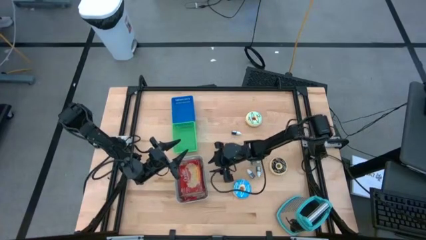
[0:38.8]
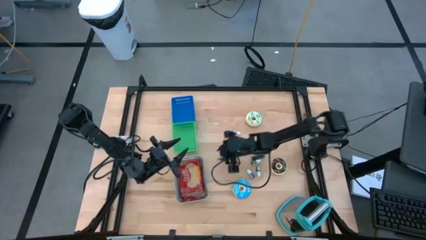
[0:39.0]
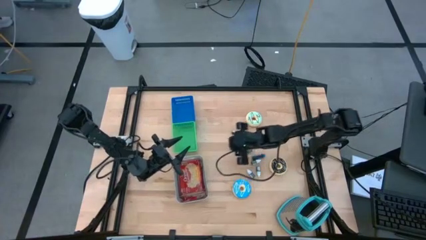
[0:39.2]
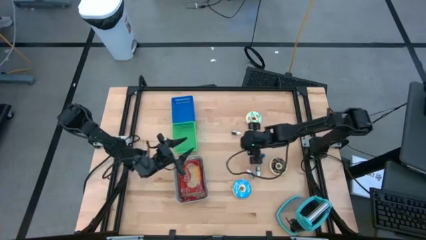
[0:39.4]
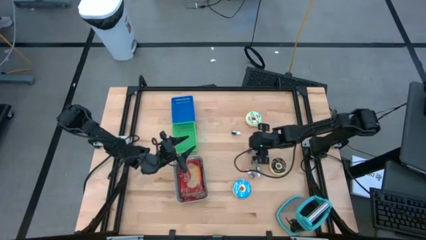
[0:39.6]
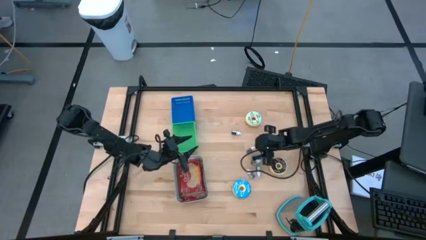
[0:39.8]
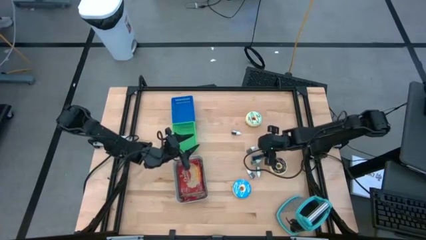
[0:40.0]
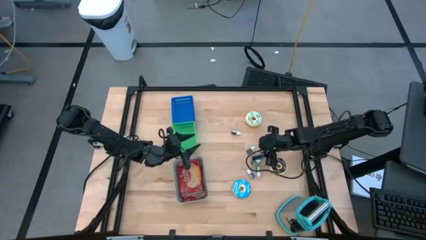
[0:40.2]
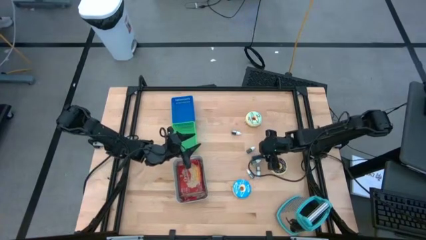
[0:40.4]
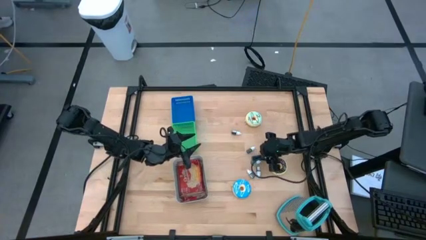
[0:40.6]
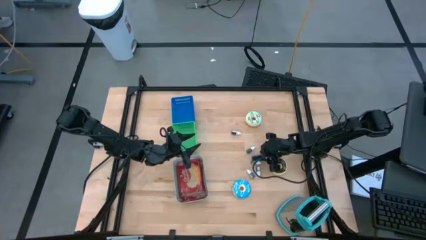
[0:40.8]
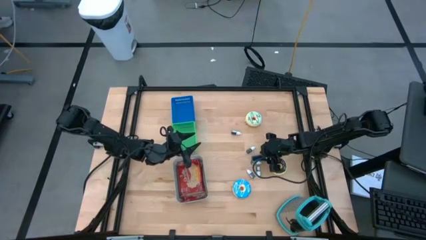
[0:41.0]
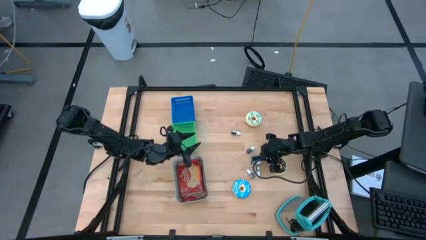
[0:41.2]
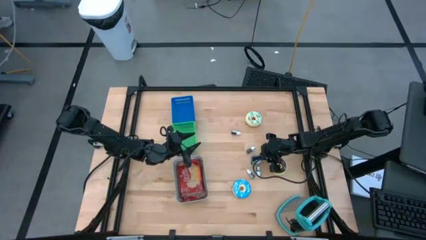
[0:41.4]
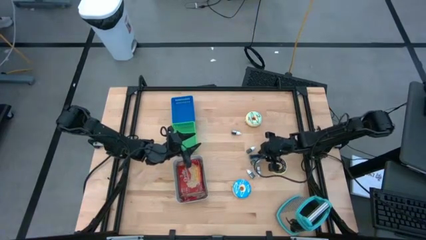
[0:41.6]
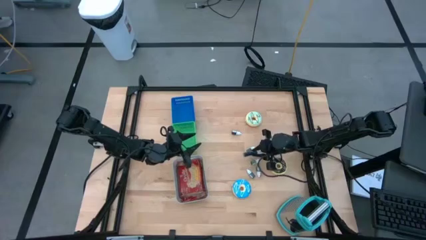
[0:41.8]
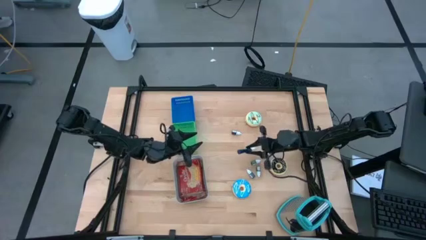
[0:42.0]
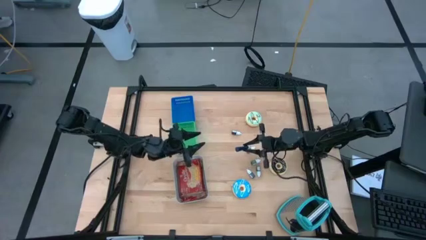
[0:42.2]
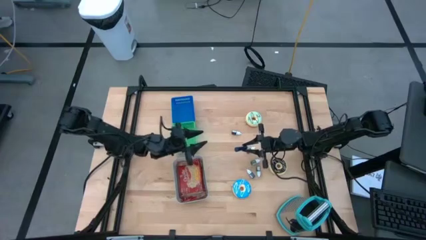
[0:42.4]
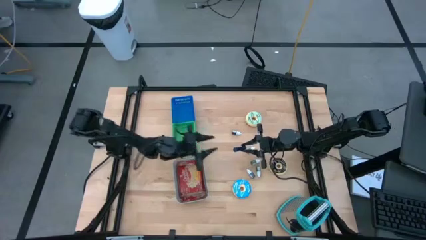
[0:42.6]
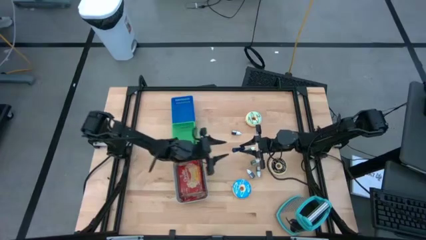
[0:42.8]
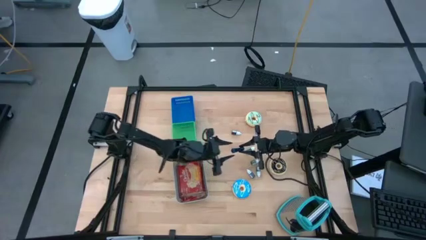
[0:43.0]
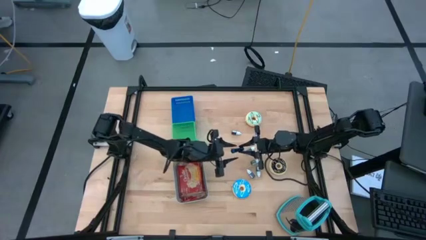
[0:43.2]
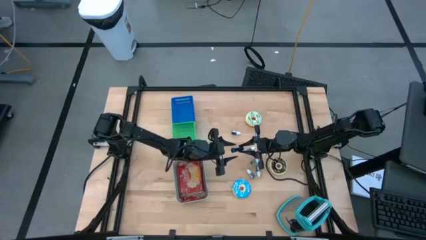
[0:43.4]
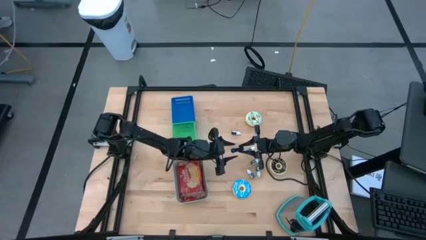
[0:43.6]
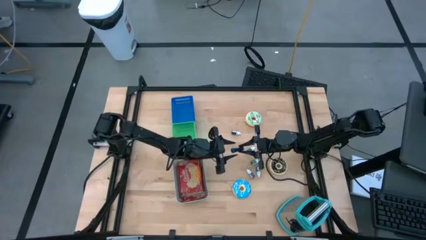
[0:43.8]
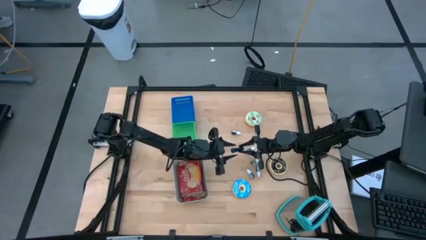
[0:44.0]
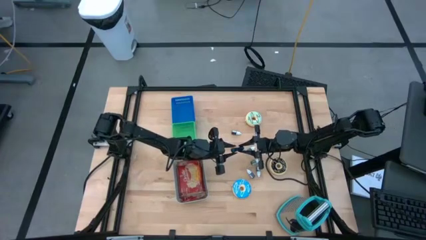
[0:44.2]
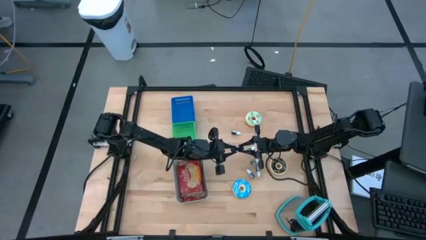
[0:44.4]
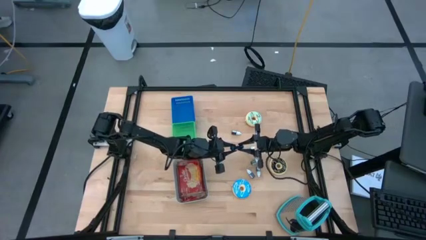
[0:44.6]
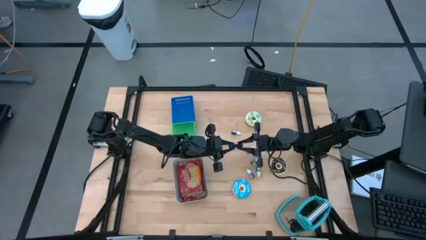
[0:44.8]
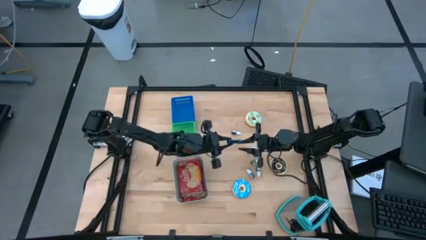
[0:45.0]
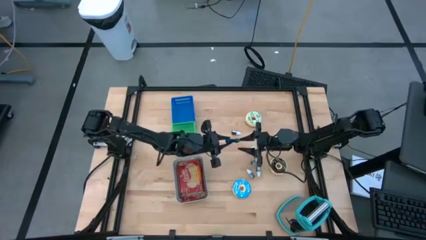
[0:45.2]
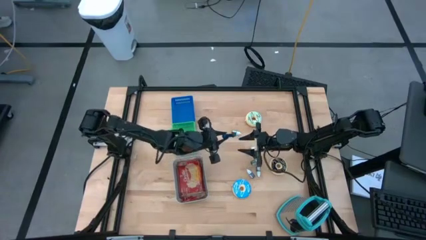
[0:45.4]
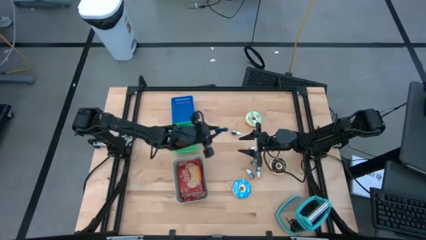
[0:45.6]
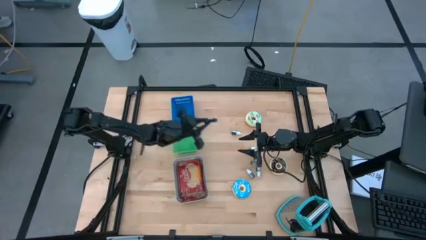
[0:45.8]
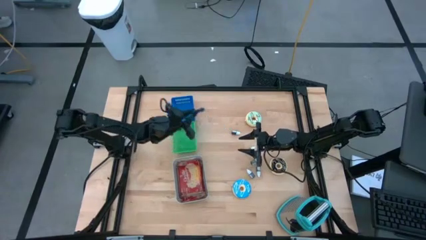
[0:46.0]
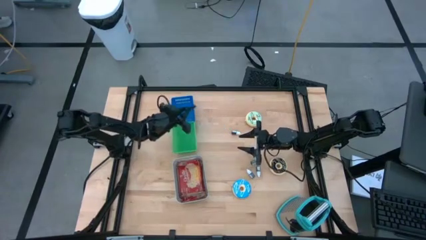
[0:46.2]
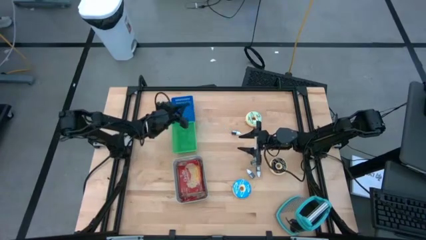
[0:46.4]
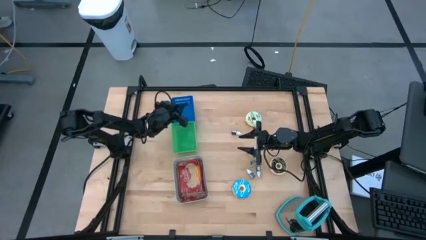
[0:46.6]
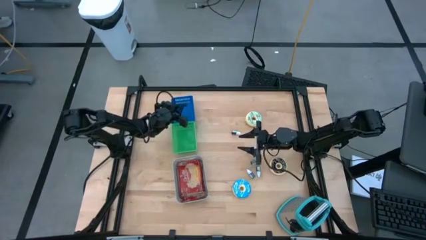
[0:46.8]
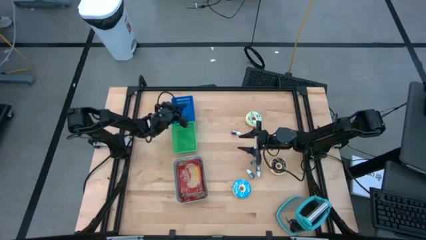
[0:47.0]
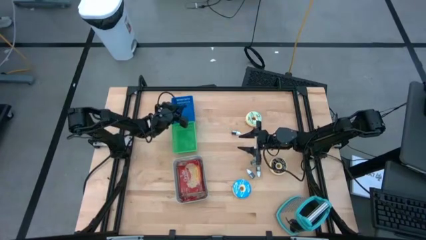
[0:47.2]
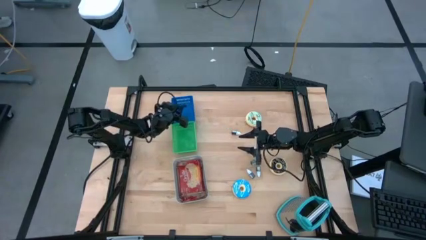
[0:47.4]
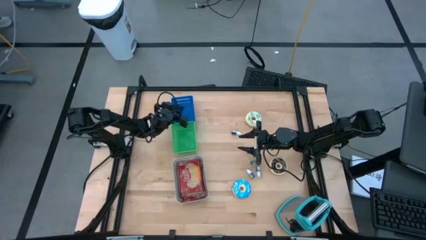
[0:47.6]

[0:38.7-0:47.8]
Task: Pick & Place Food Item
Put the blue food coloring bottle into the blue bin

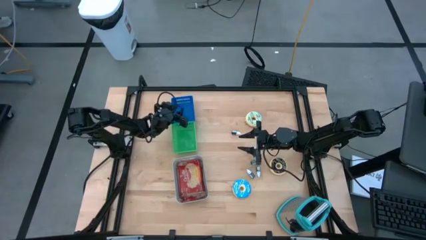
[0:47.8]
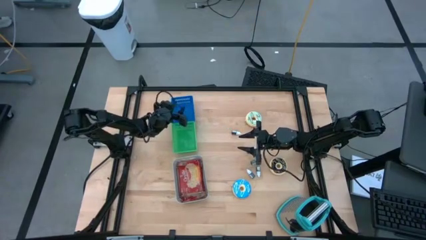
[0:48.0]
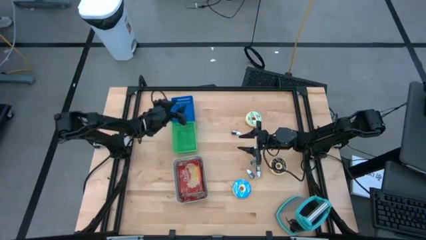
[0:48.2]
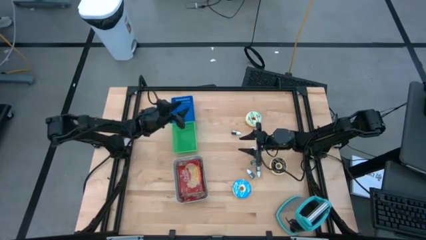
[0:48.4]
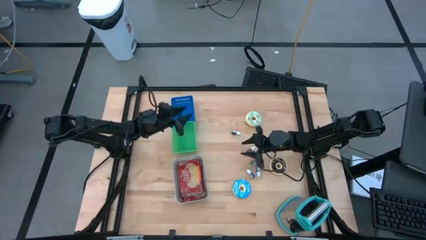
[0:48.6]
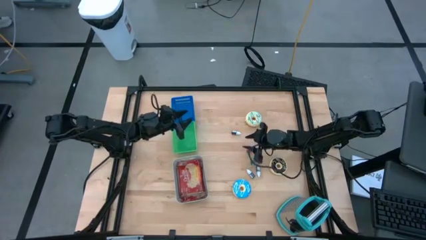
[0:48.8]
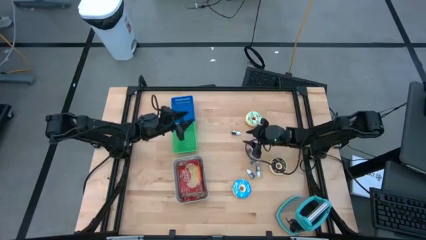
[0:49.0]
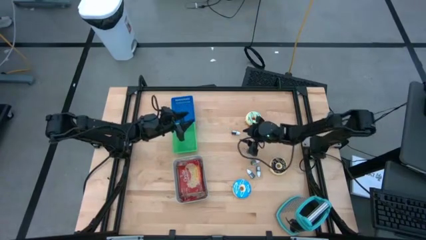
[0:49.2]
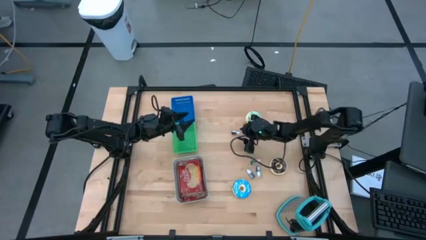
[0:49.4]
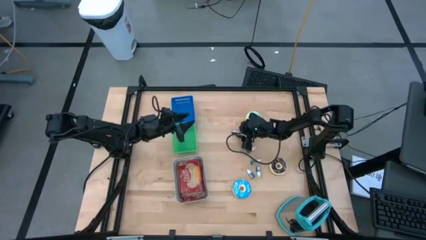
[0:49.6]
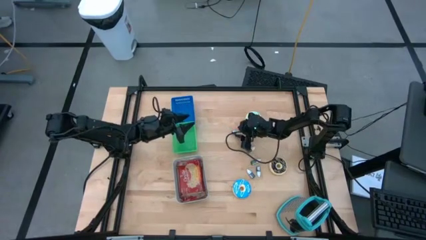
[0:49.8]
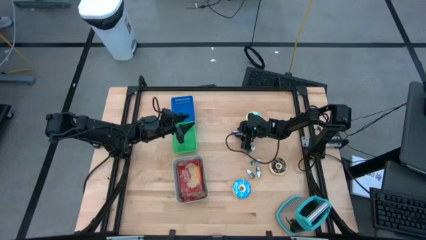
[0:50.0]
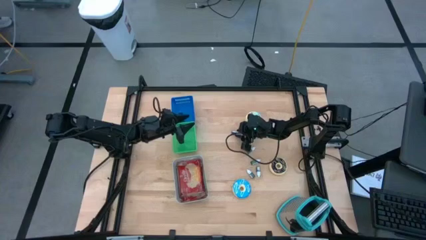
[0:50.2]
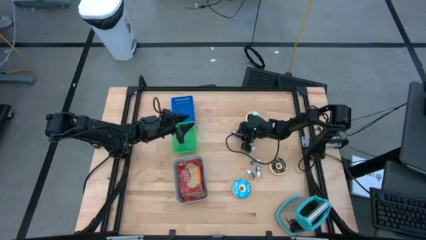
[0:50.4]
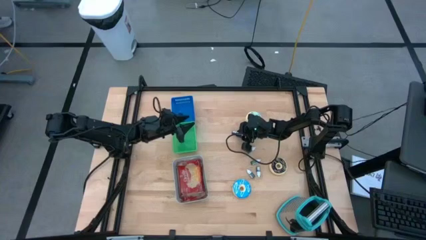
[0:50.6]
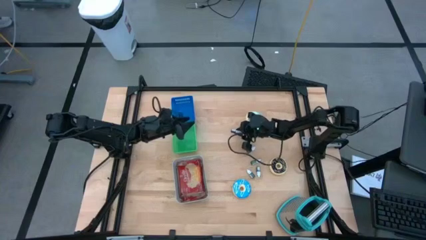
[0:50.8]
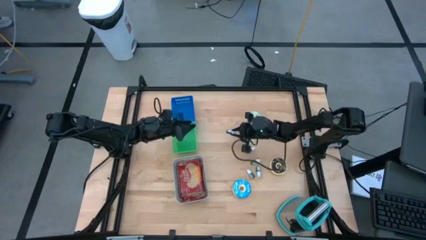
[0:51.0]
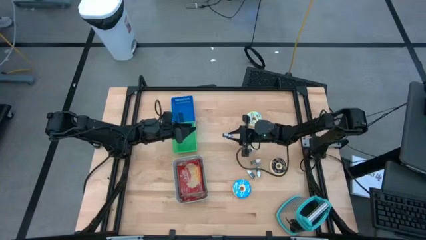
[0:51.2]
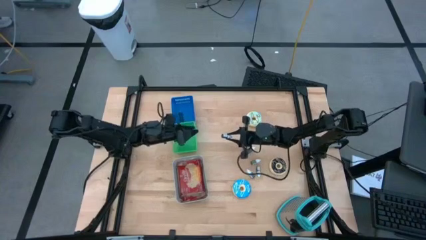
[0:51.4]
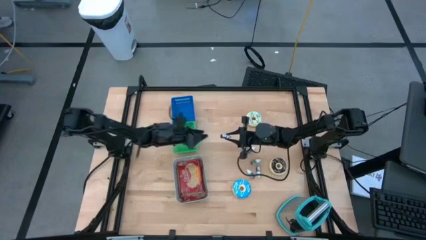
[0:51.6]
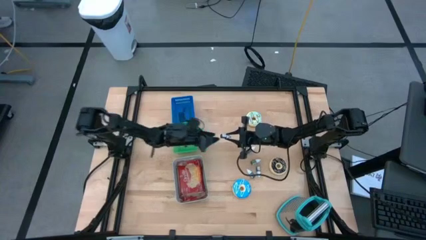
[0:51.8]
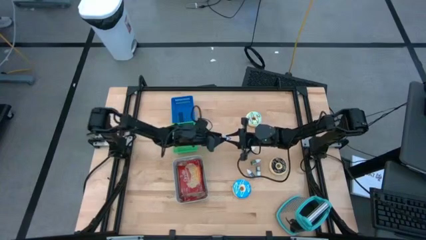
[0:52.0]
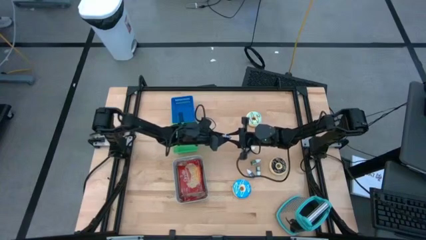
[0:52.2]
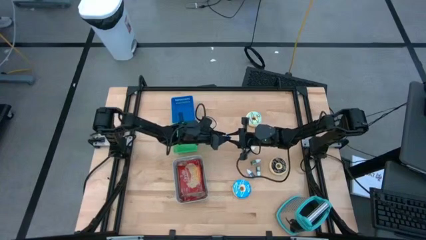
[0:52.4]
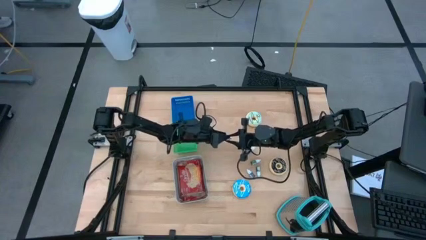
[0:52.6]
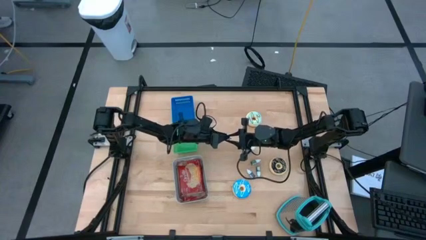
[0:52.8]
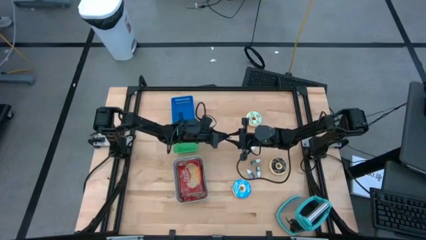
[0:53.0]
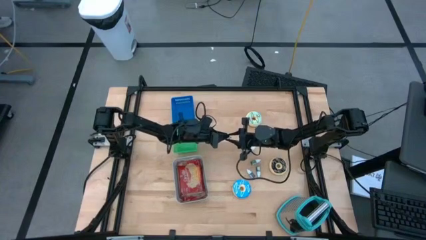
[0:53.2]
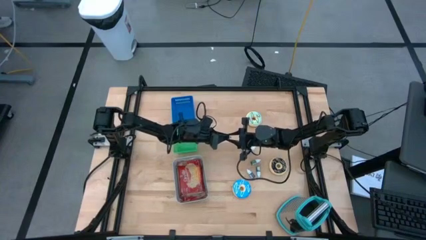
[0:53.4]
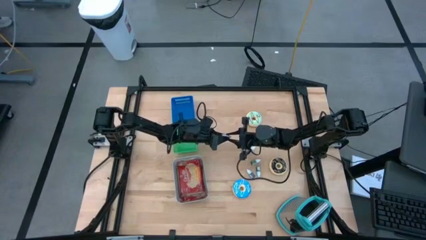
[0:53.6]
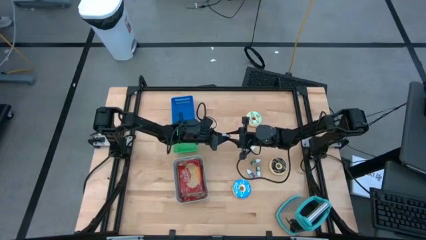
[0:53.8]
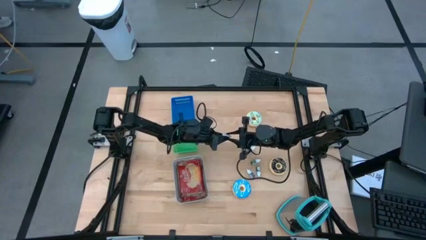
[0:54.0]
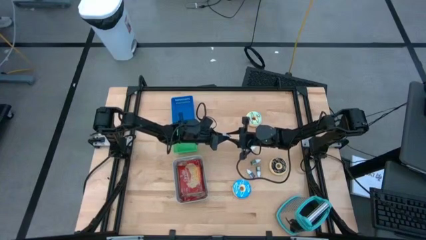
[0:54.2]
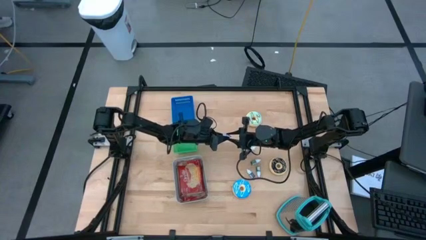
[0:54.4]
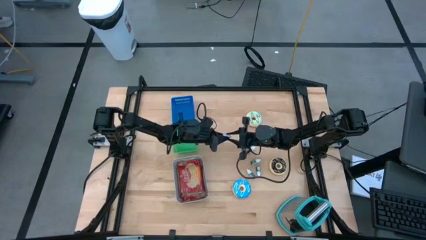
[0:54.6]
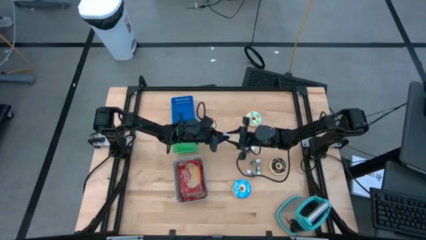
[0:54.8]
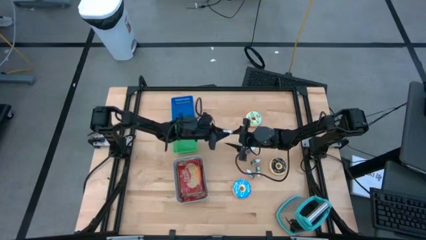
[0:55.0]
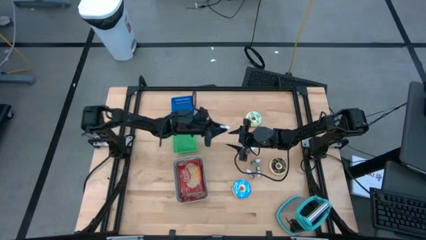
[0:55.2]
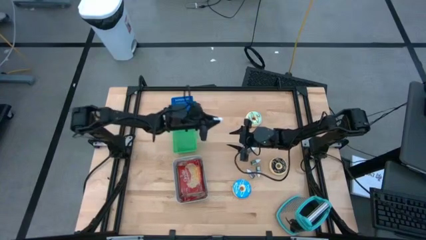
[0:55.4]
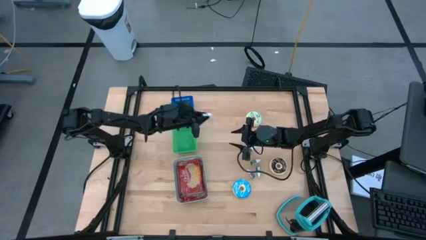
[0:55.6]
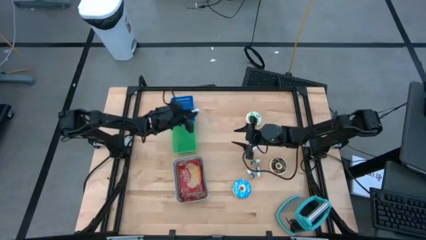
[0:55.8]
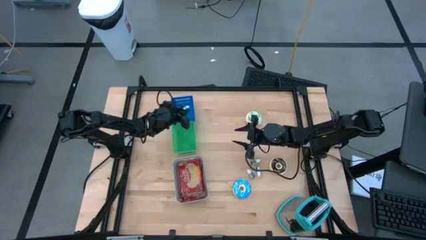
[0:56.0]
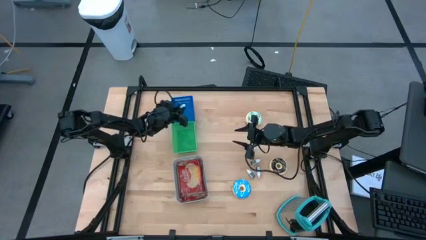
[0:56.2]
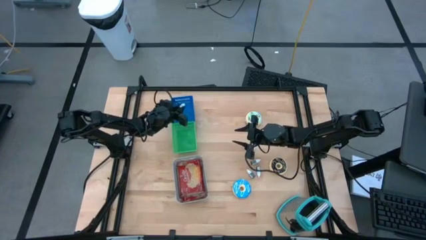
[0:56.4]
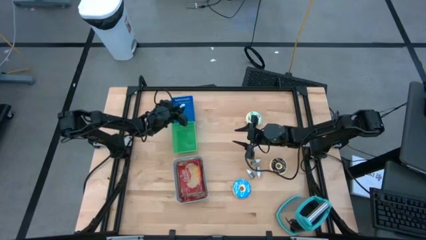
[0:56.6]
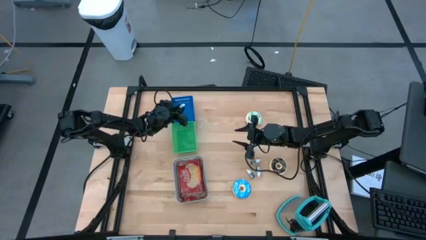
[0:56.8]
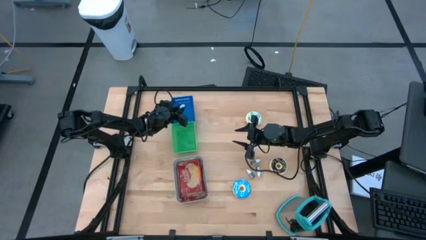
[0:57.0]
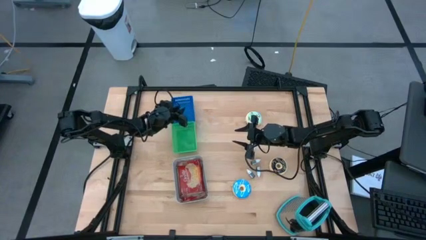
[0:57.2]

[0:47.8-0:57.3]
Put the top violet food coloring bottle into the blue bin
